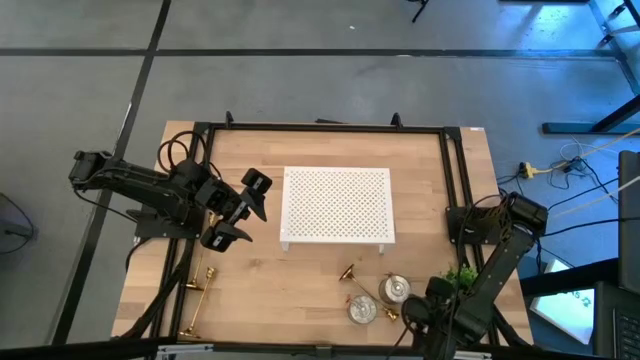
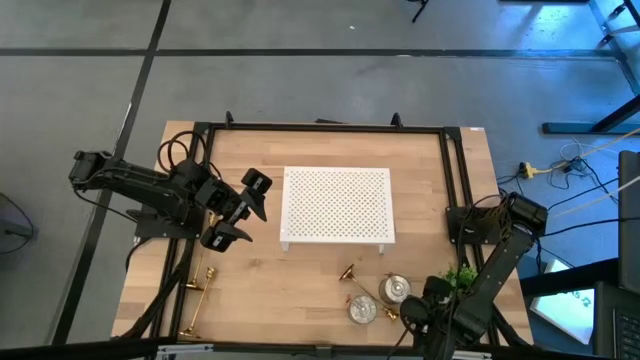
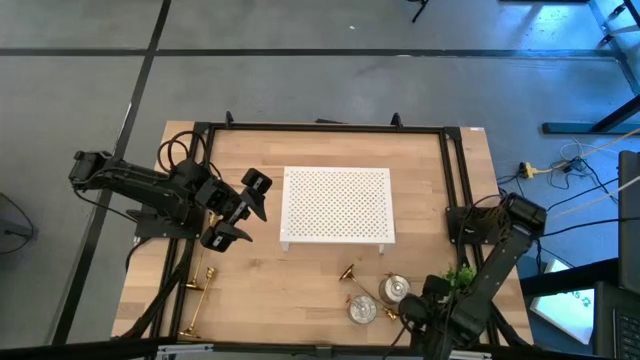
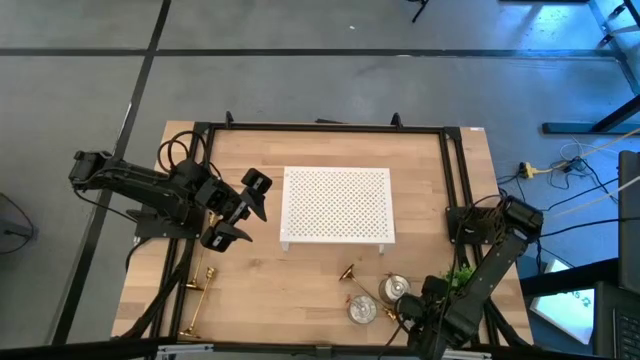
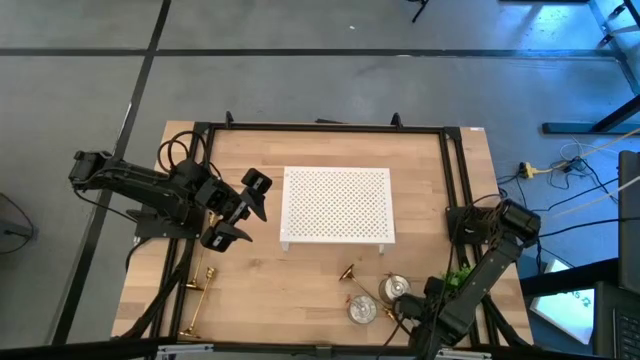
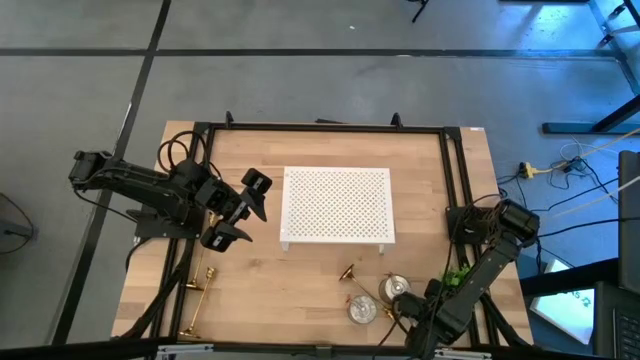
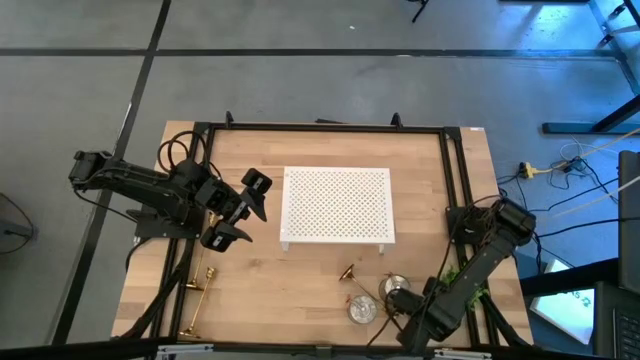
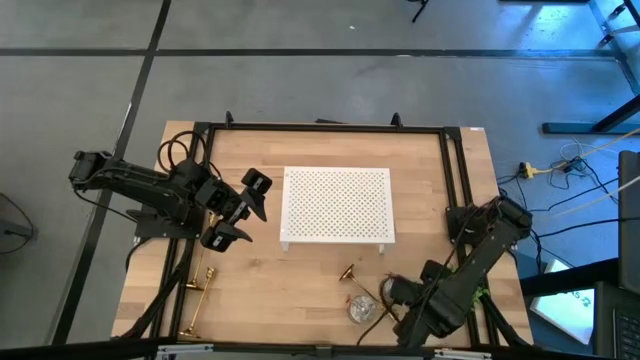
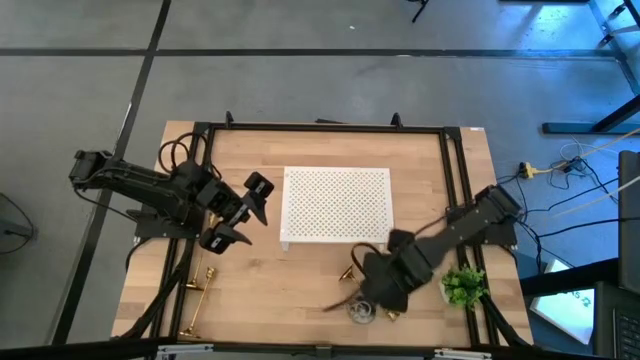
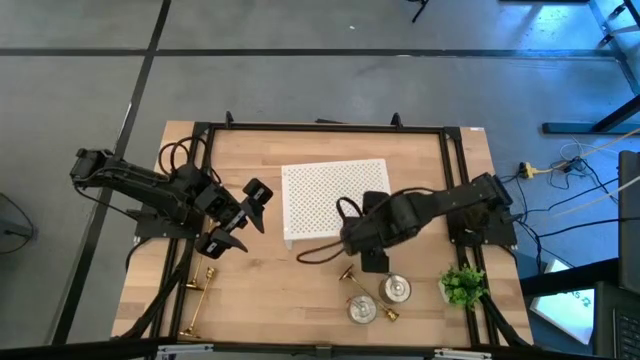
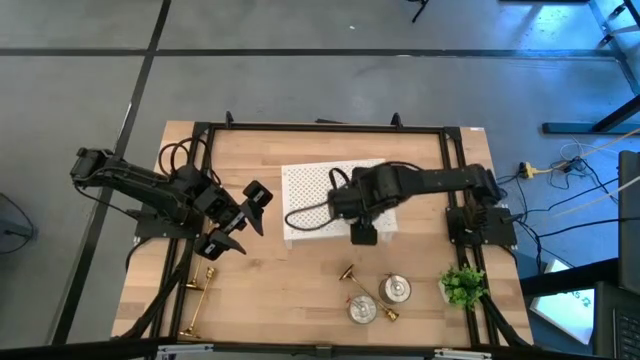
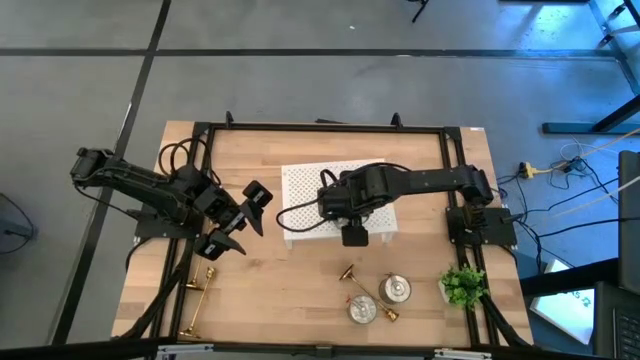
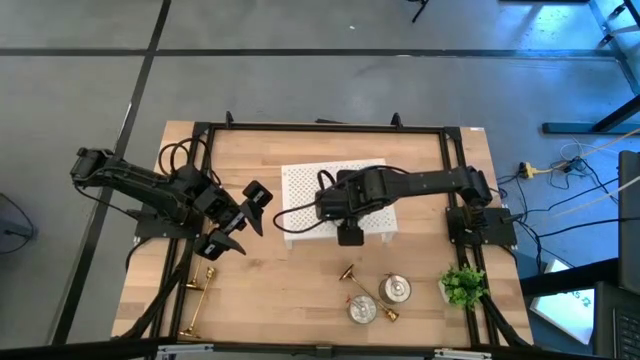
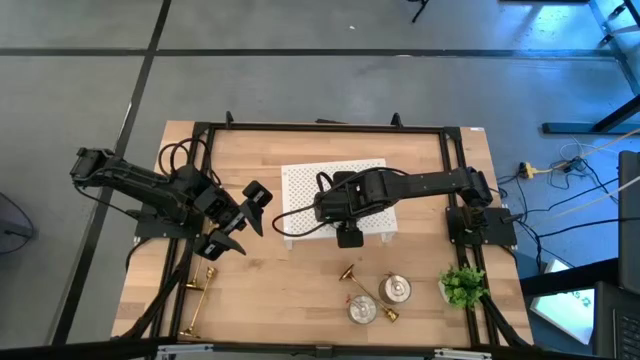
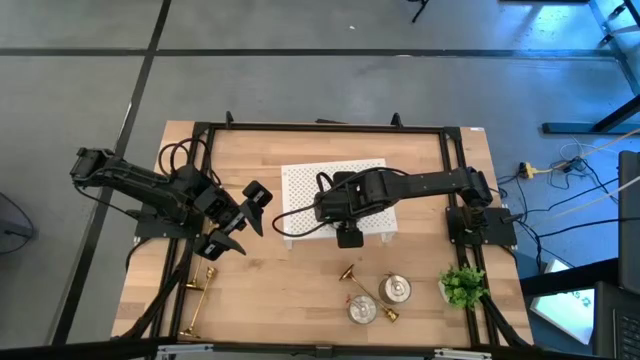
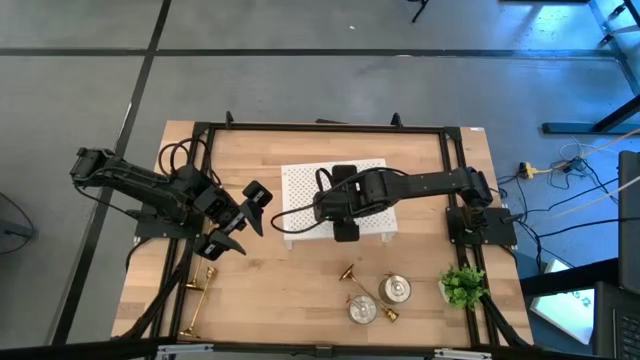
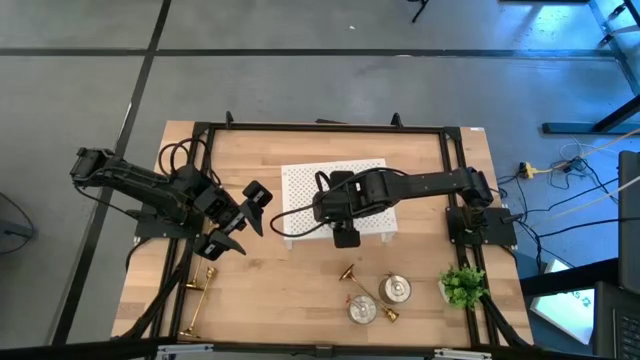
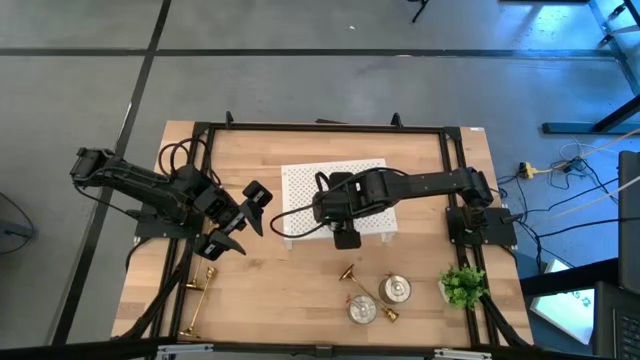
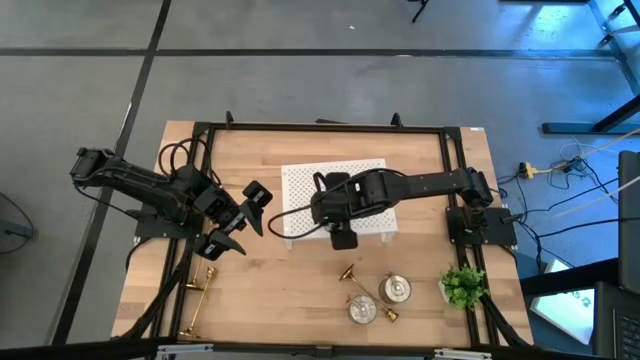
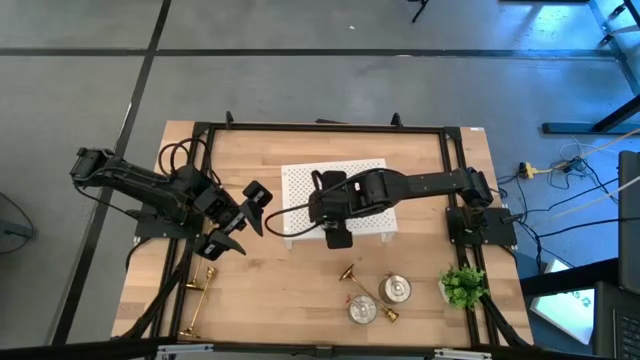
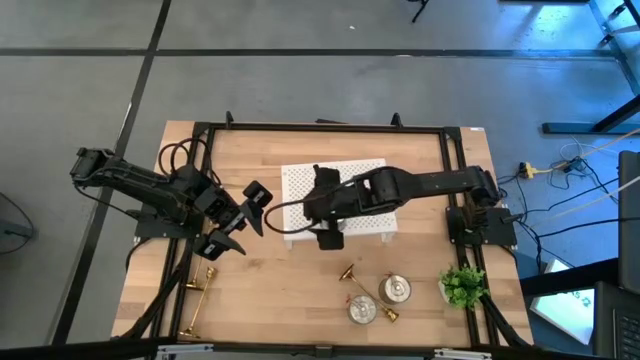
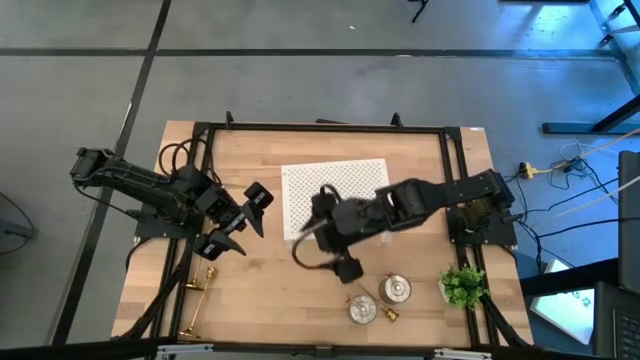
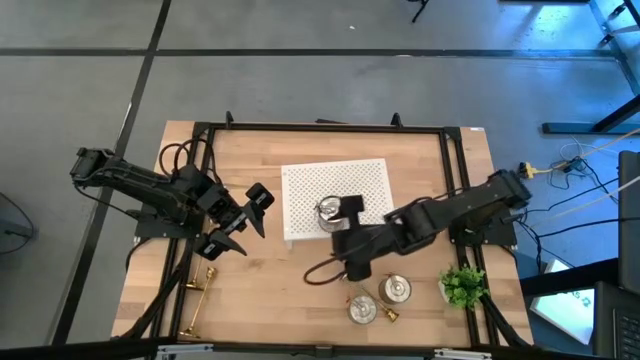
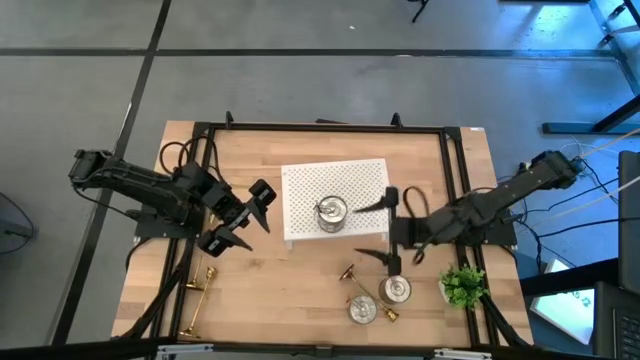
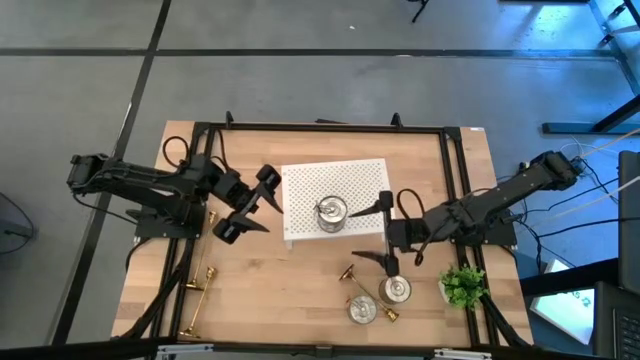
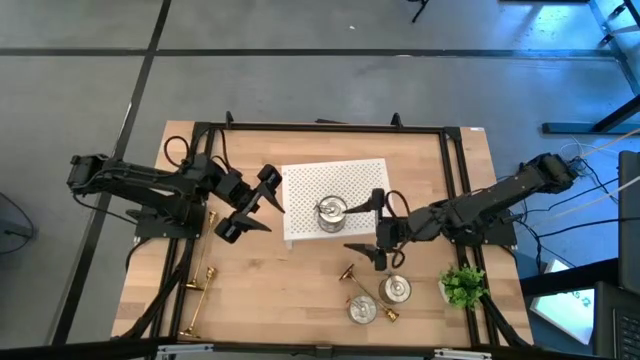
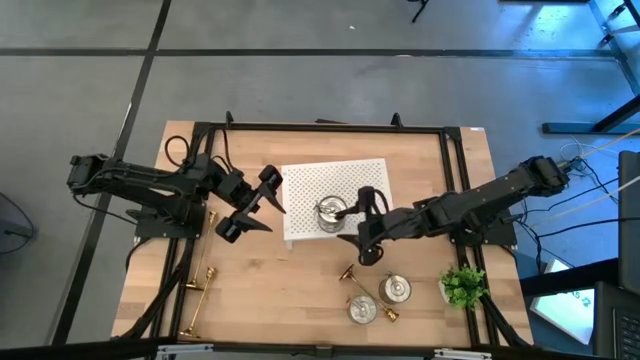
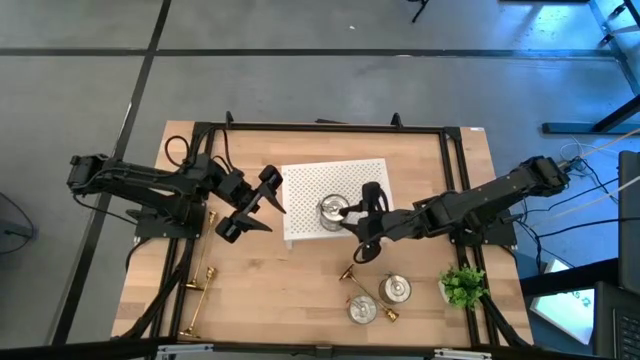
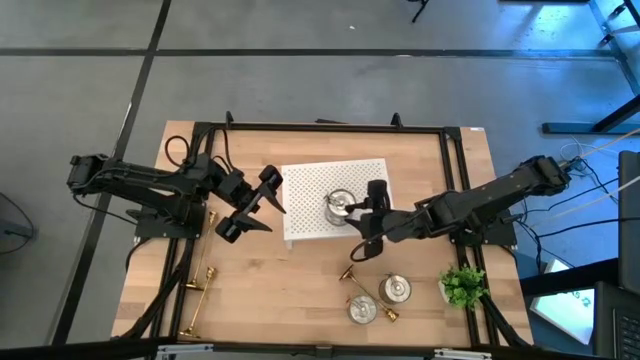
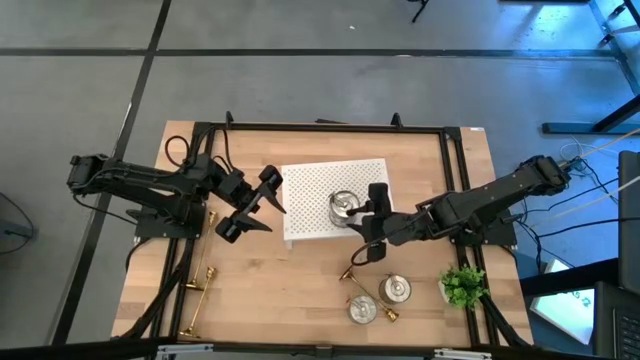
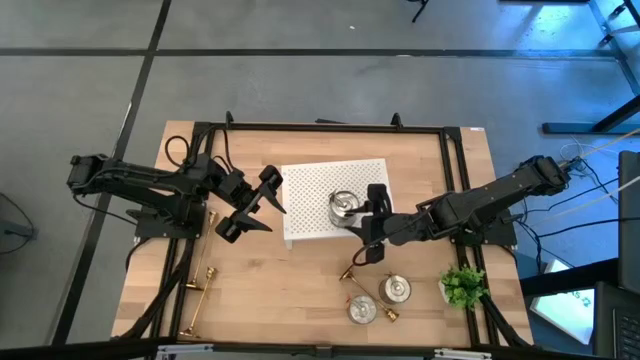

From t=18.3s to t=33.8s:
Task: Pick & Place candle stick holders
Put the right silver scented candle on the shelf

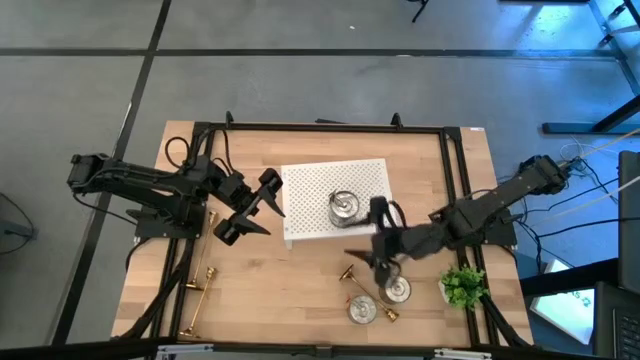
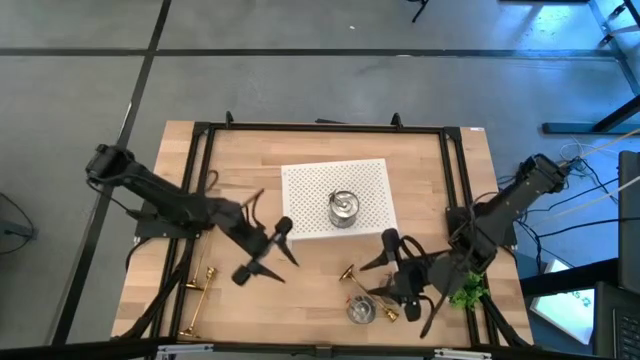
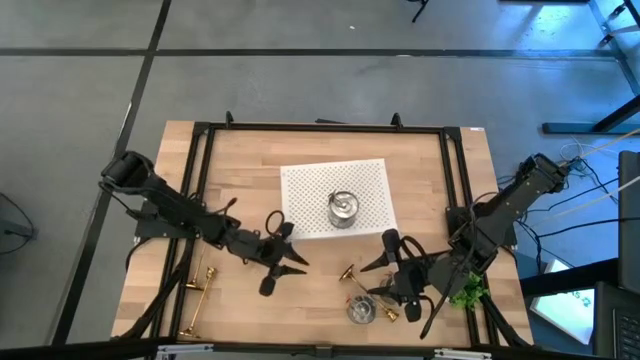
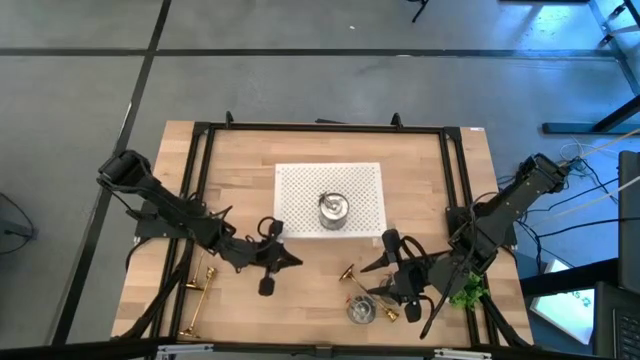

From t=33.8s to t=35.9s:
Adjust the shelf

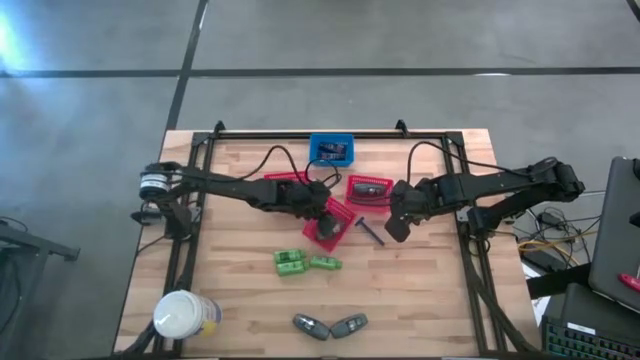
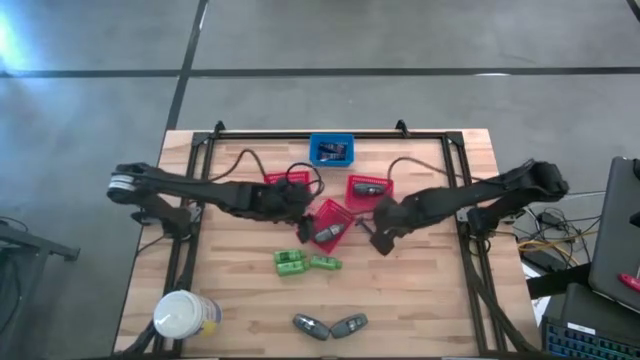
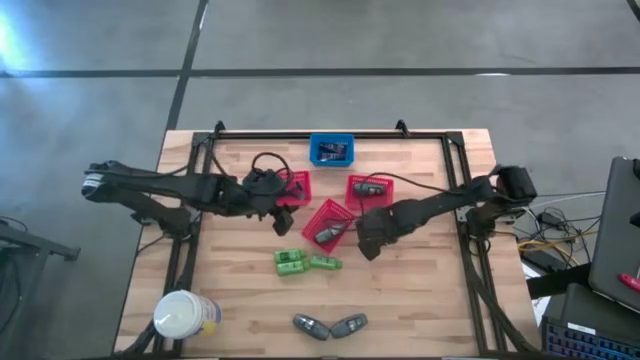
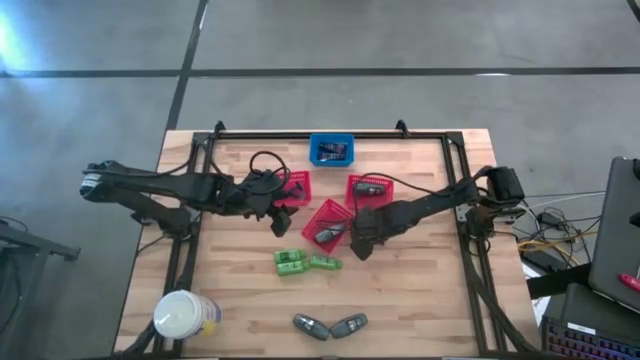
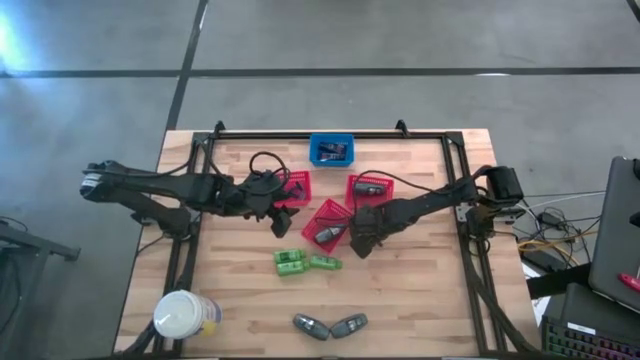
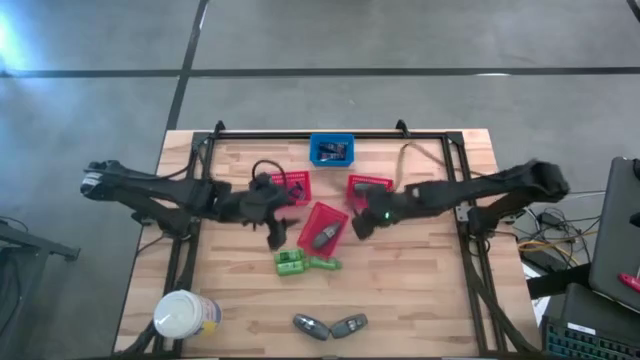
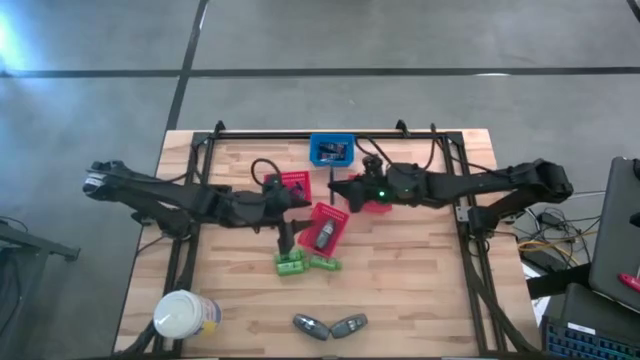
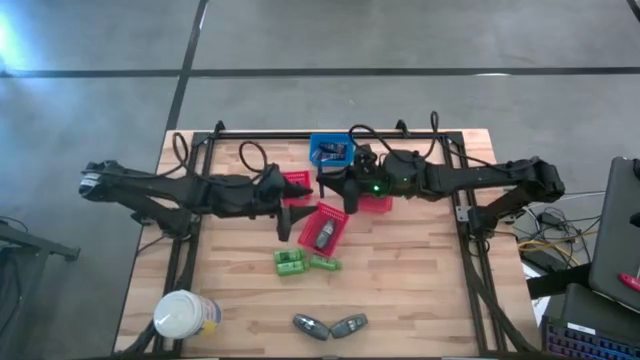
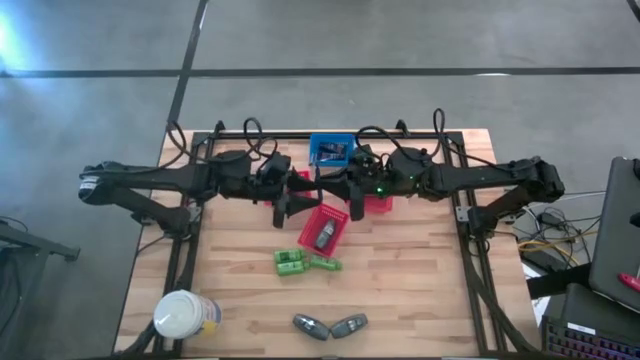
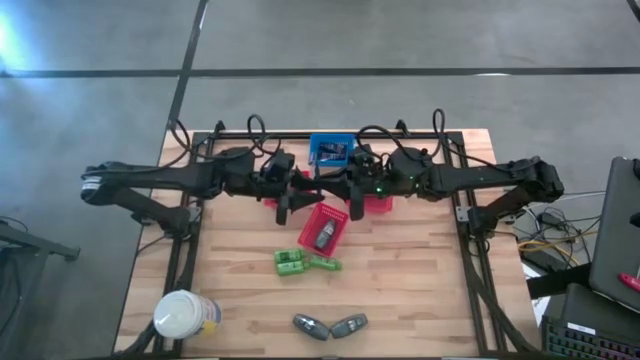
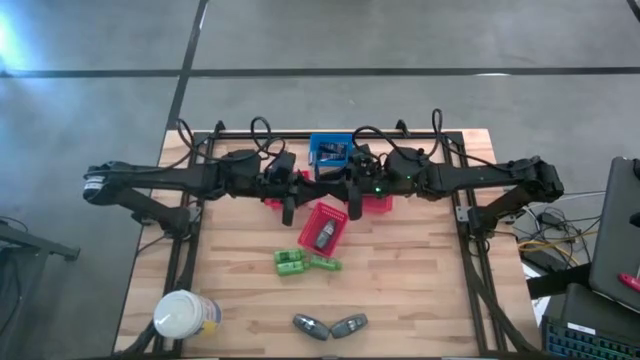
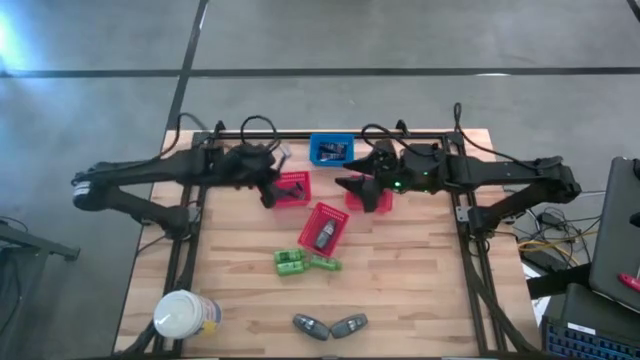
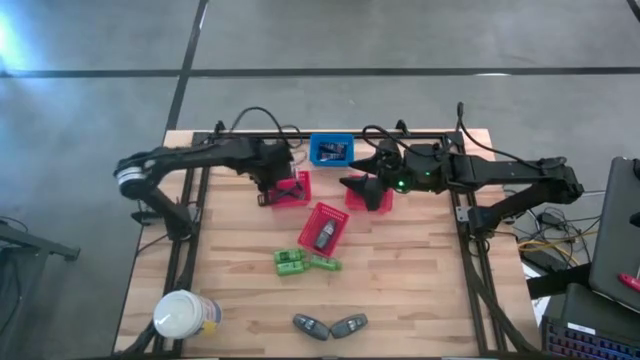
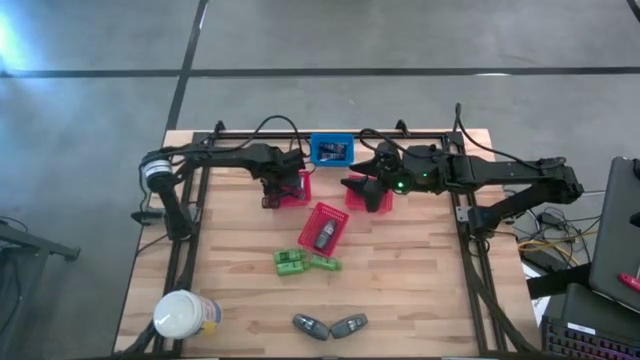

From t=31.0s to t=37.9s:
Task: Pick & Place Travel size toiletries
Put the blue razor into the top left red bin
